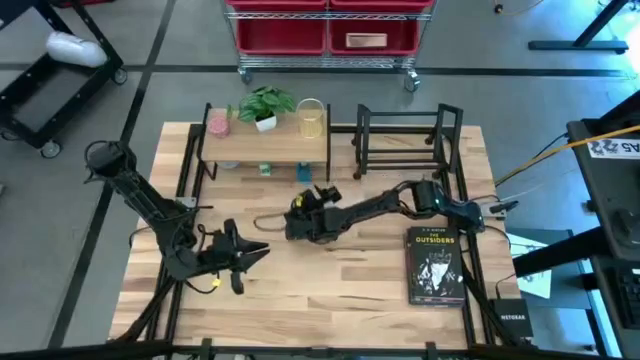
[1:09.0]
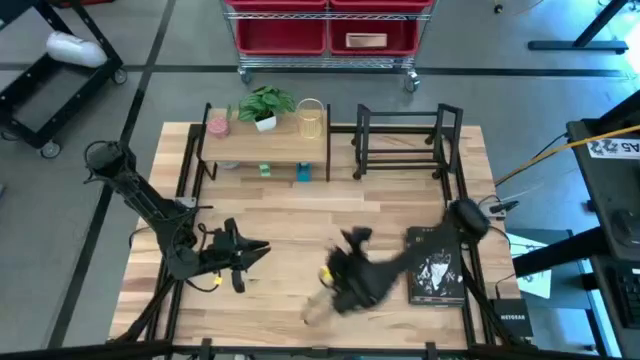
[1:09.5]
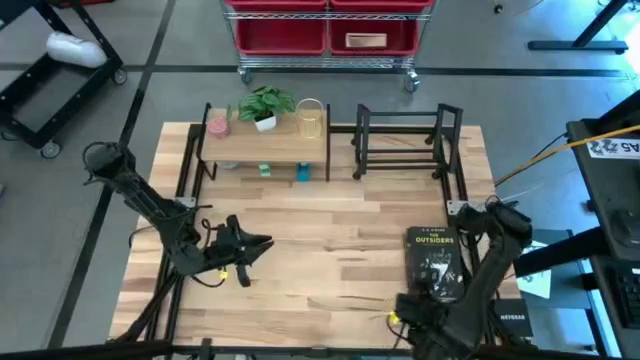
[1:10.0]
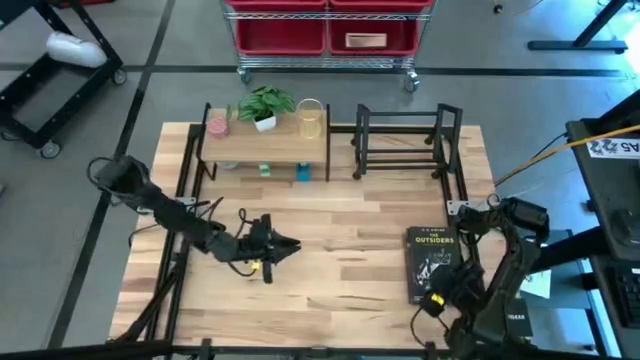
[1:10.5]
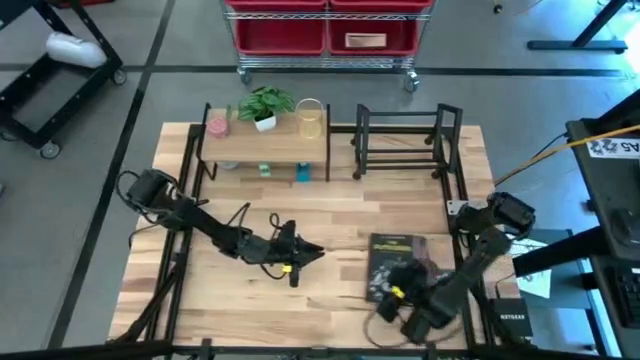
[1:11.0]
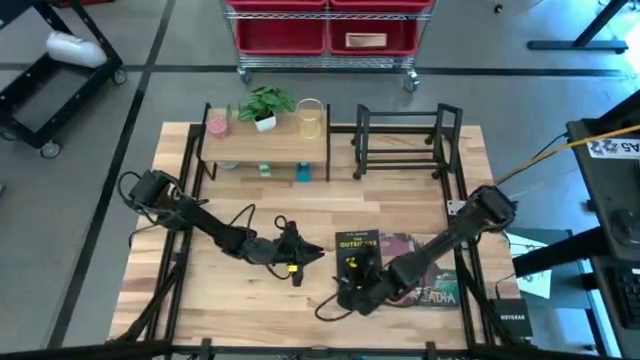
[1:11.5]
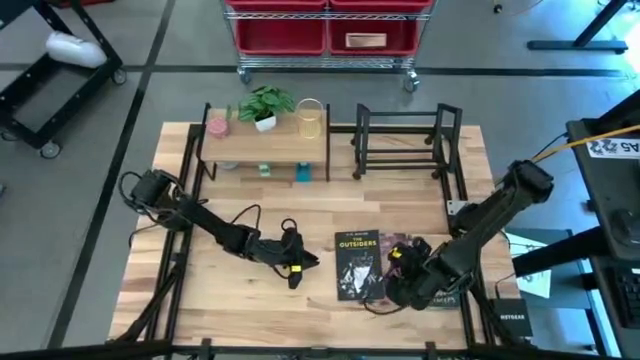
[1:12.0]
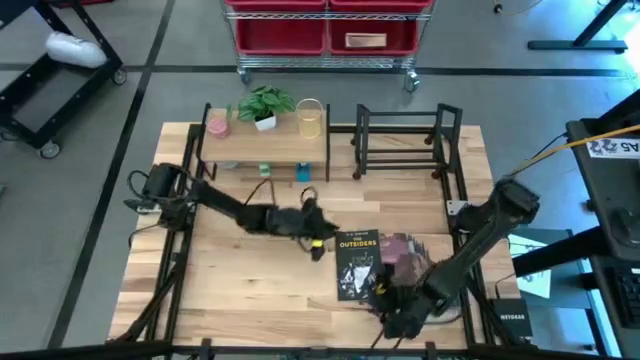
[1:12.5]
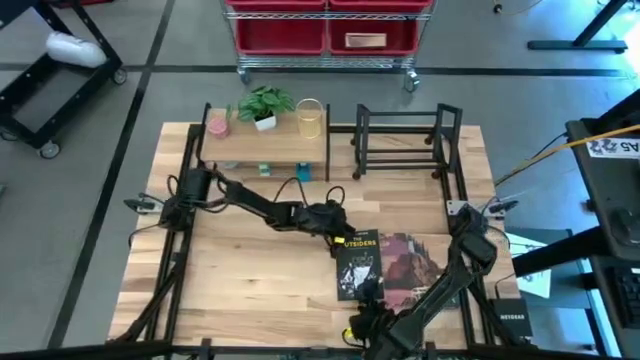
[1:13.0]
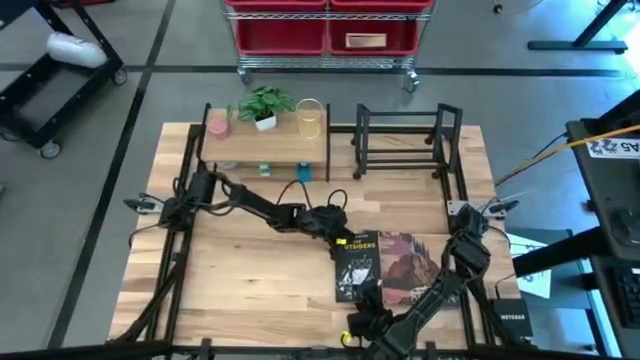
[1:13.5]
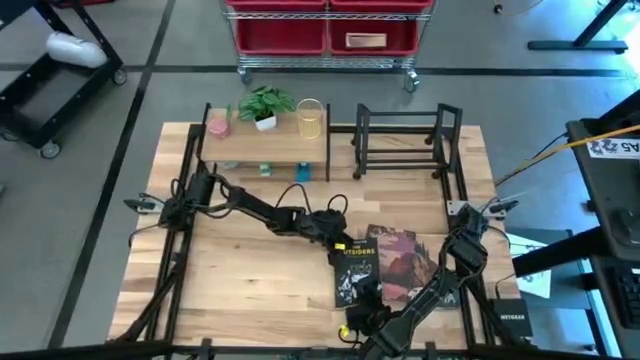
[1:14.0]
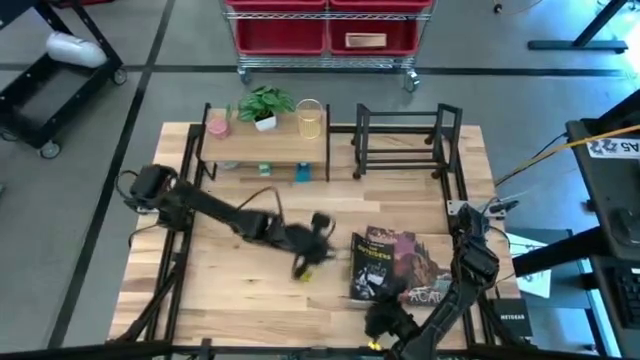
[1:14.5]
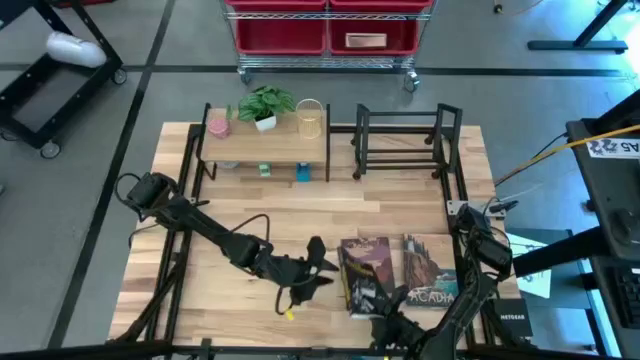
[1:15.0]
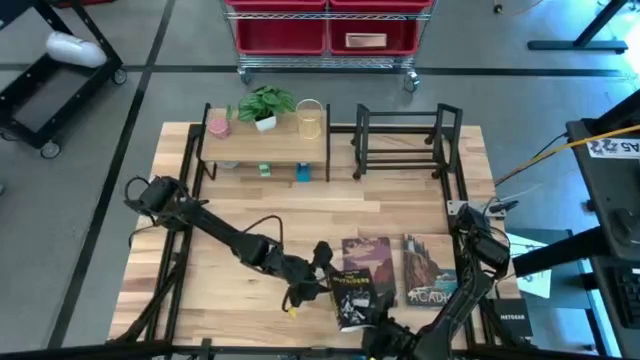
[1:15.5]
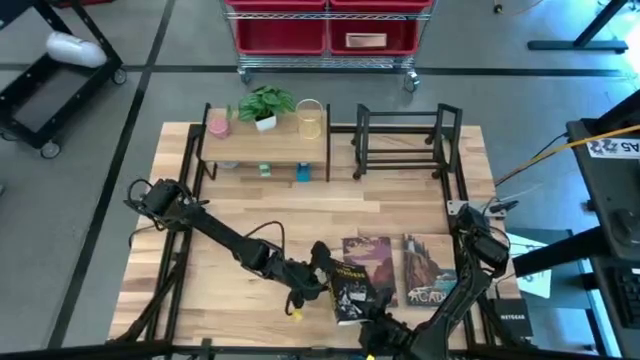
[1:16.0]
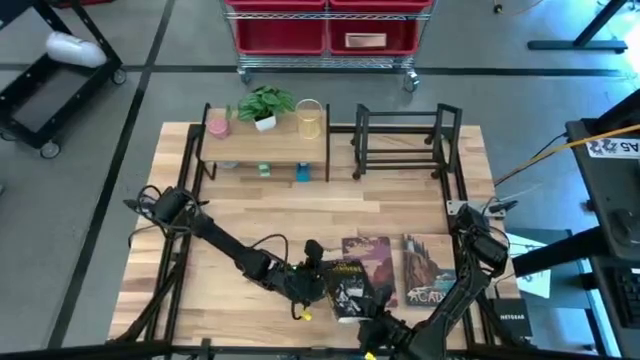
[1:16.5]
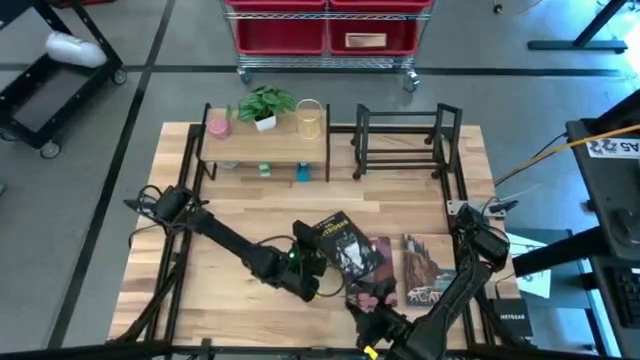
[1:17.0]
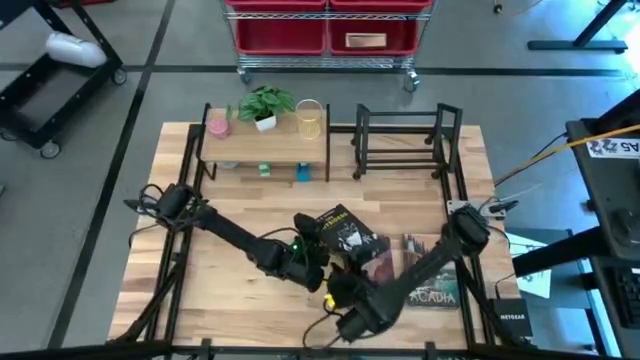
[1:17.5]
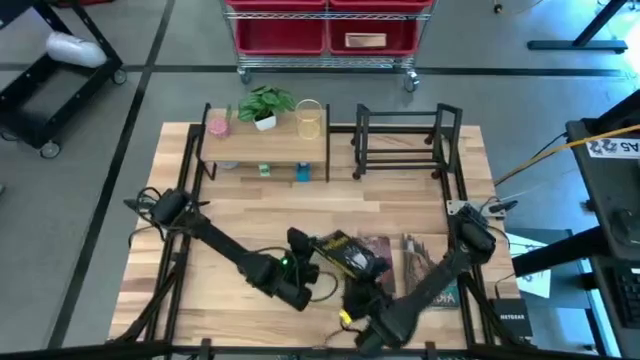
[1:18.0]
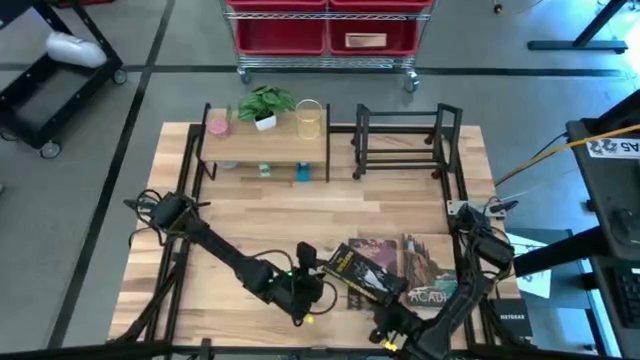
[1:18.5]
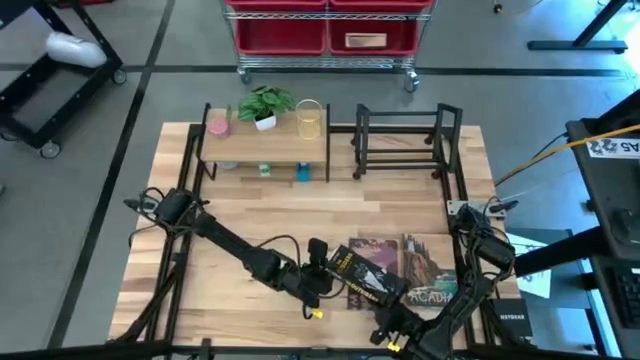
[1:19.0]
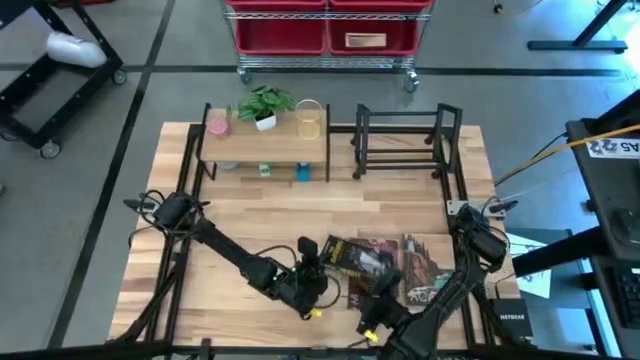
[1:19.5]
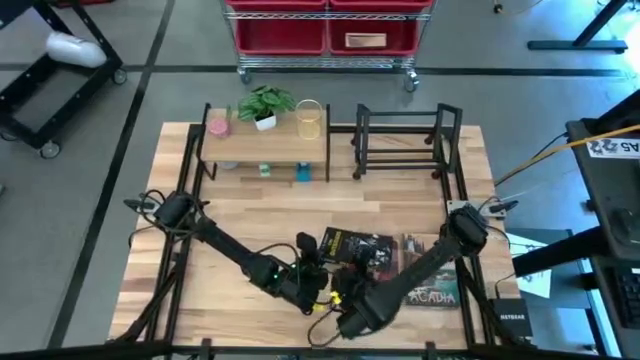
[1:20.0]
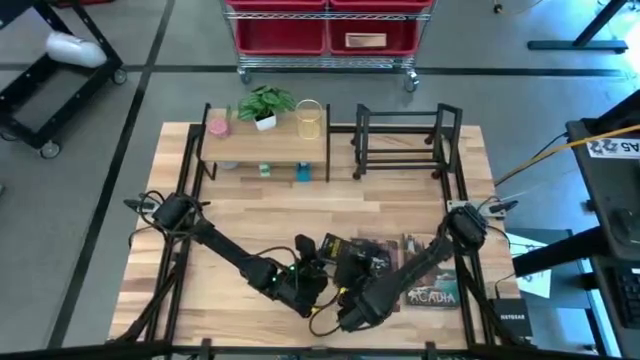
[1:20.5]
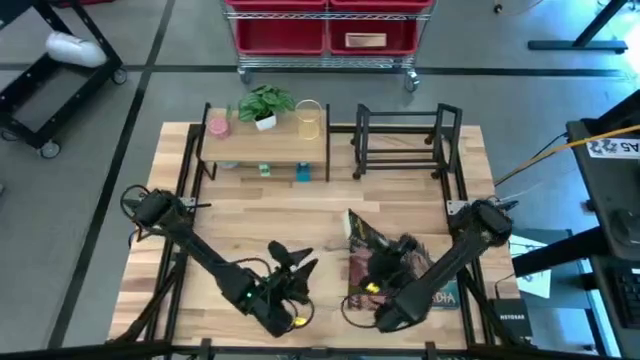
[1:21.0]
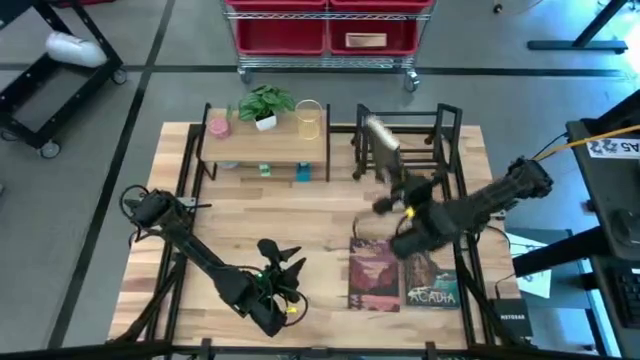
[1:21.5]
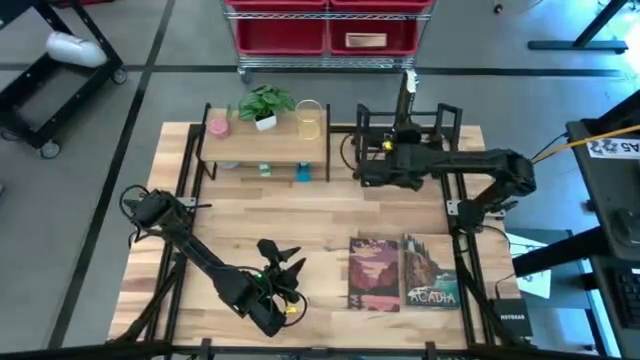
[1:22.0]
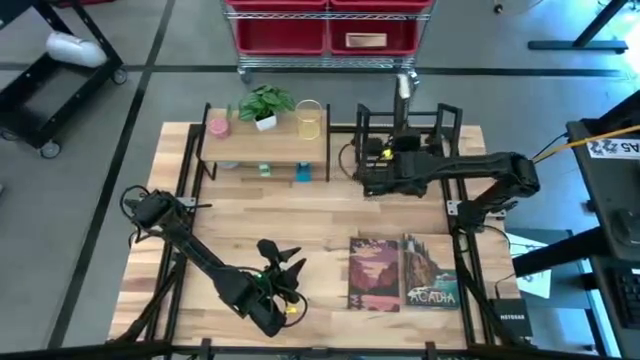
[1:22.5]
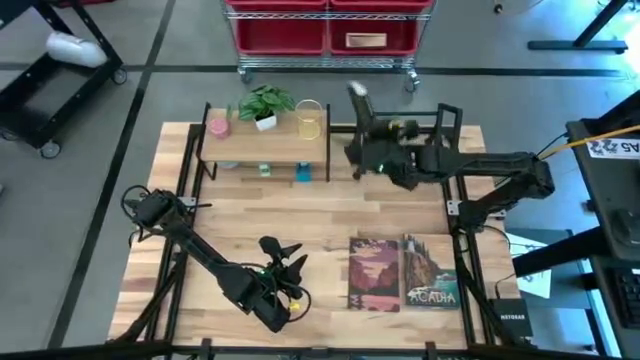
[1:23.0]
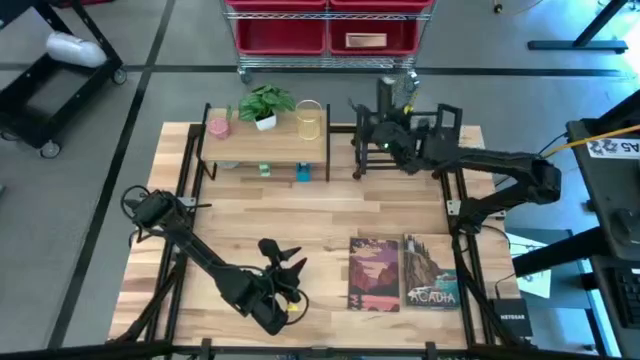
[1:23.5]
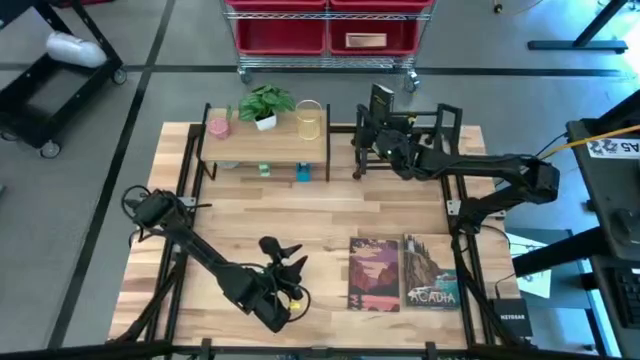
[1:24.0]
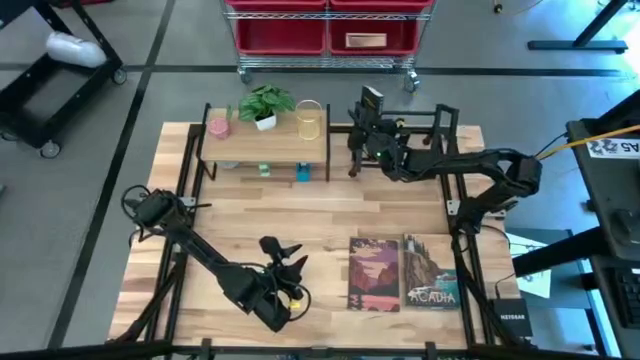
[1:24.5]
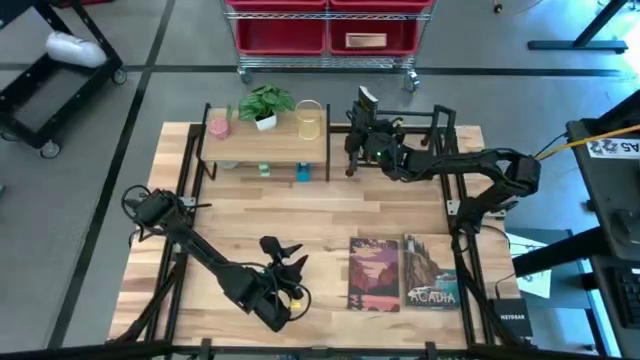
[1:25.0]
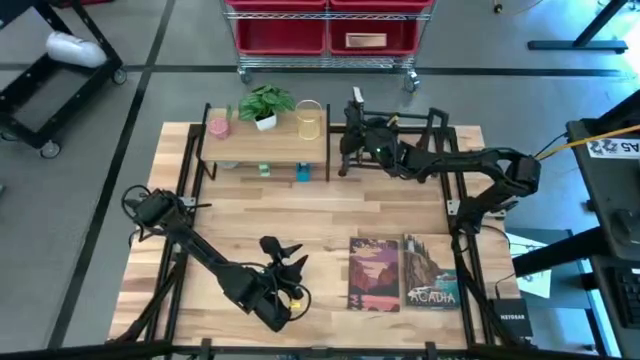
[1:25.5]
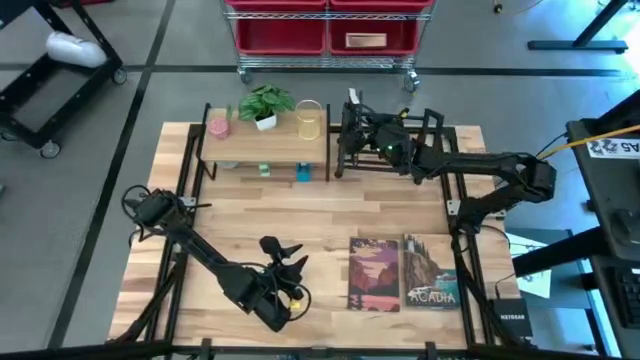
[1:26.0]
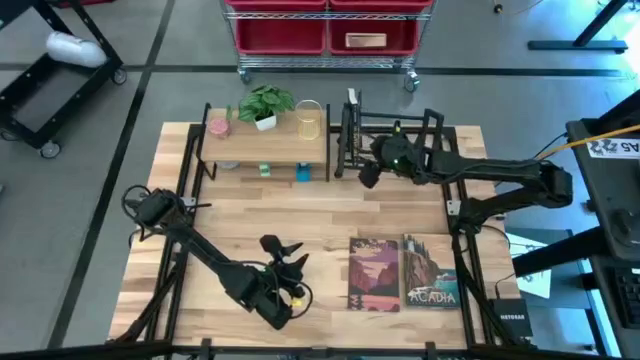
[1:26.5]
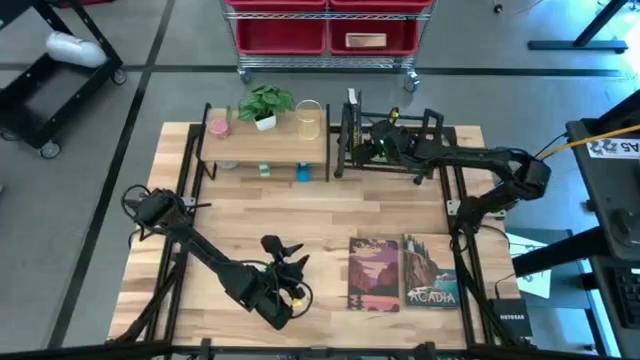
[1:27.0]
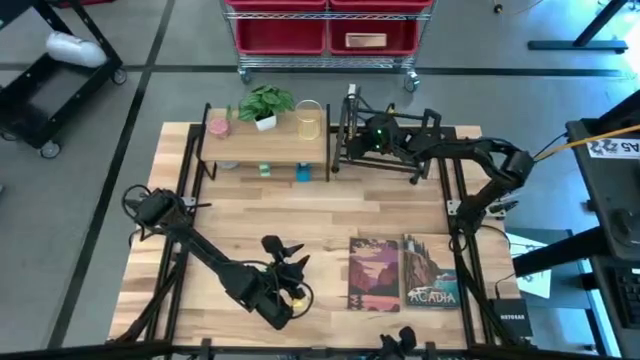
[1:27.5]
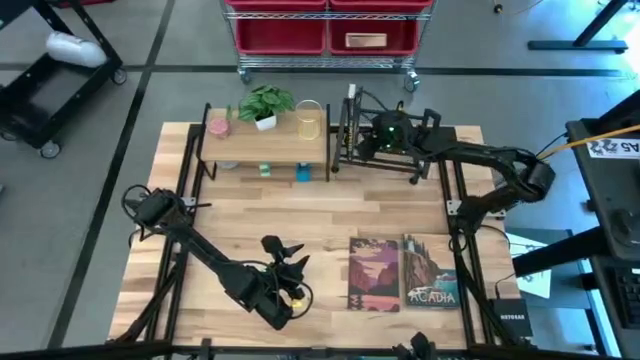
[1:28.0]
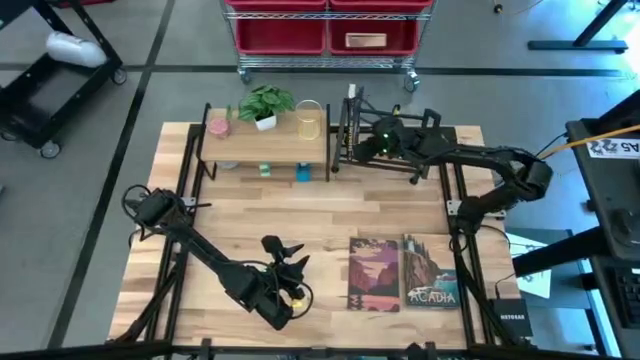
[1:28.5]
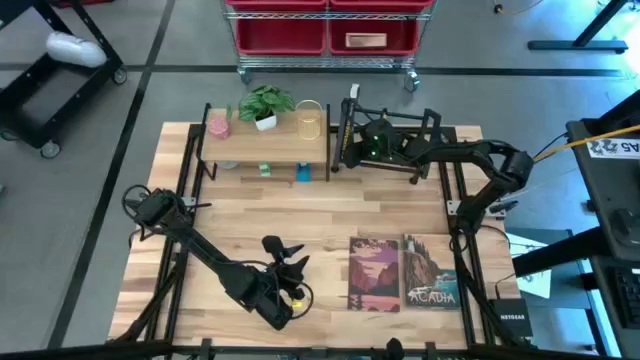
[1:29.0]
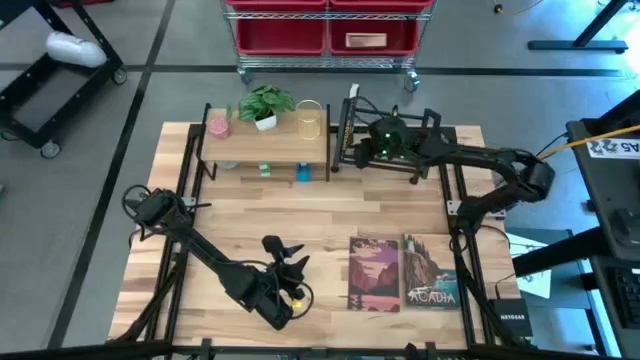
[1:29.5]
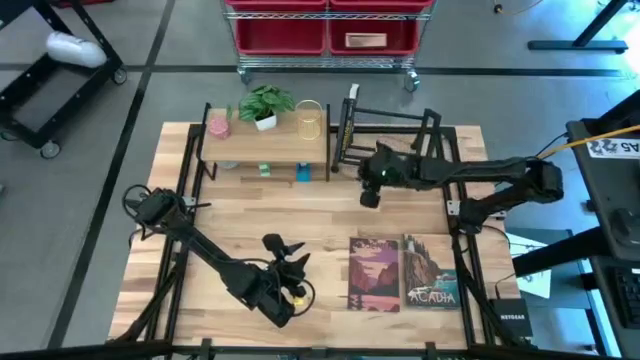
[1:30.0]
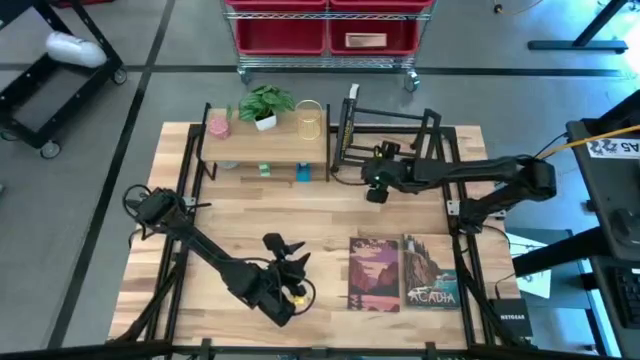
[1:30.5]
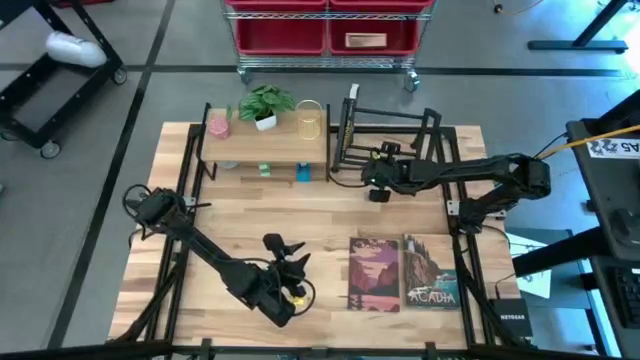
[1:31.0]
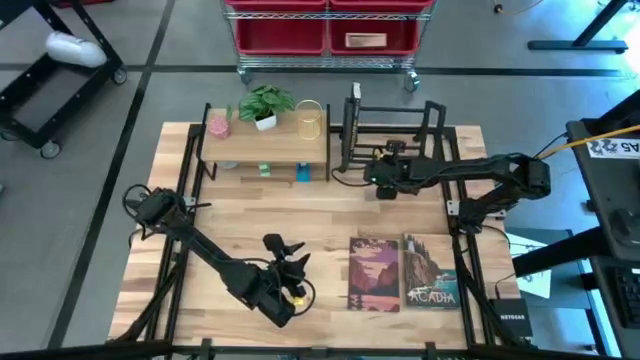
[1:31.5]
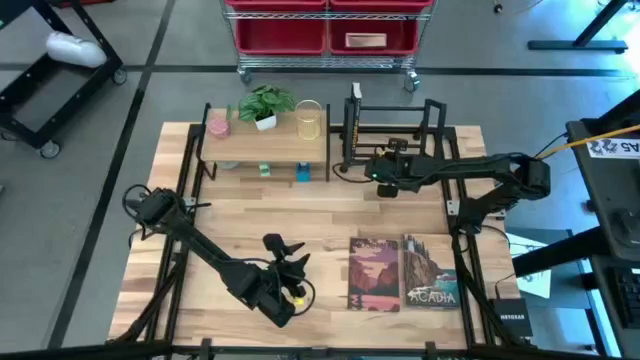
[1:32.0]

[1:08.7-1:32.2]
Task: Stock shelves
Put the black book on the bookshelf
